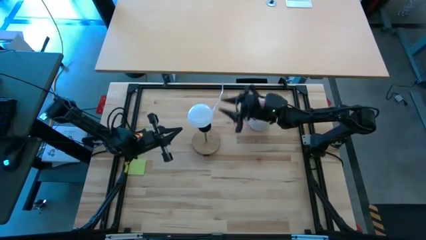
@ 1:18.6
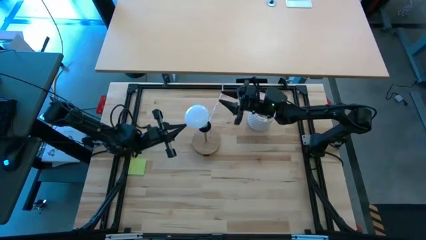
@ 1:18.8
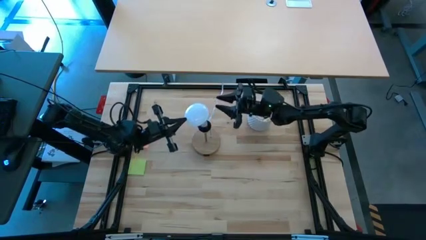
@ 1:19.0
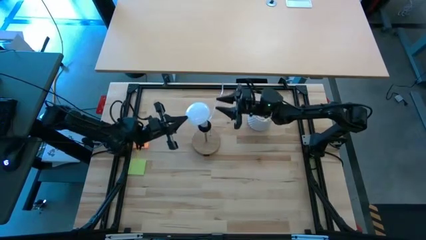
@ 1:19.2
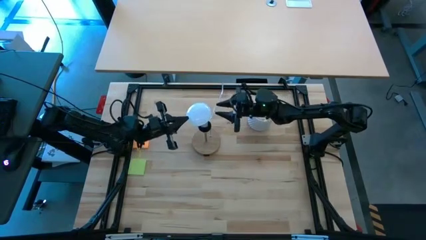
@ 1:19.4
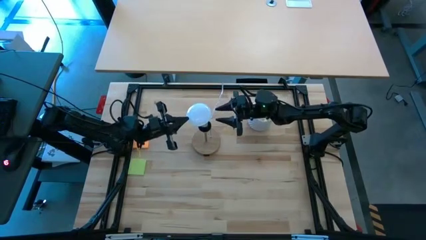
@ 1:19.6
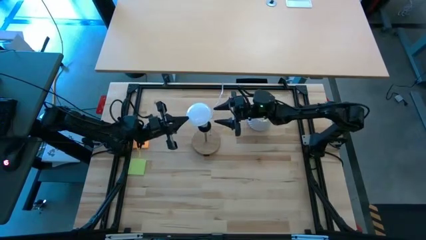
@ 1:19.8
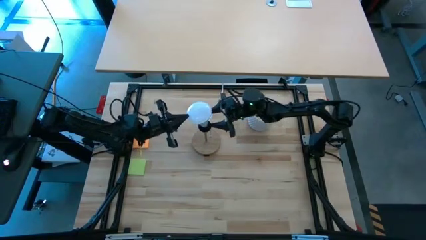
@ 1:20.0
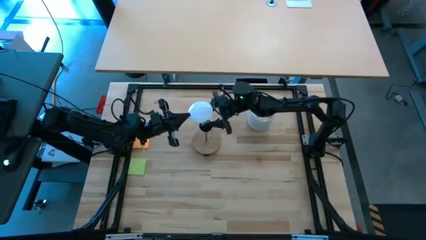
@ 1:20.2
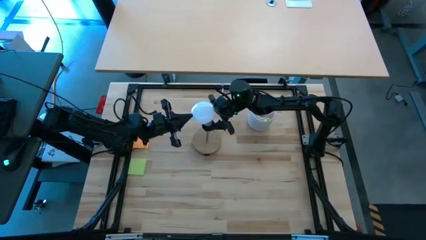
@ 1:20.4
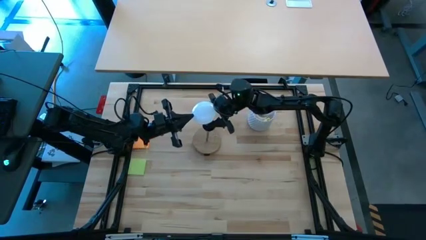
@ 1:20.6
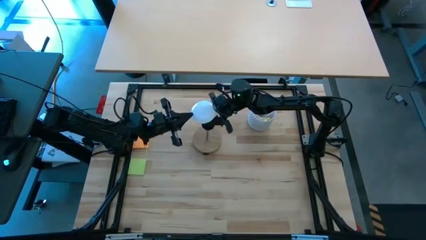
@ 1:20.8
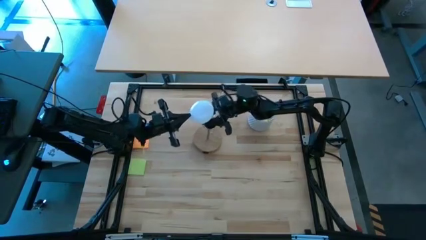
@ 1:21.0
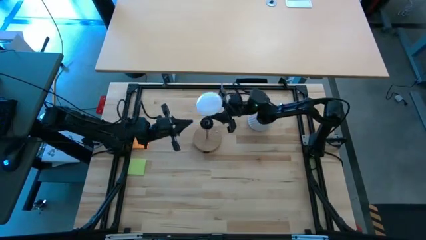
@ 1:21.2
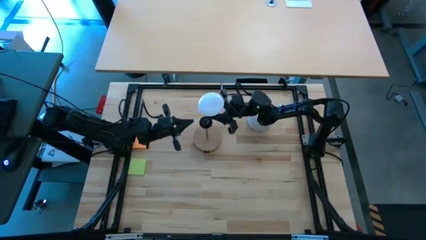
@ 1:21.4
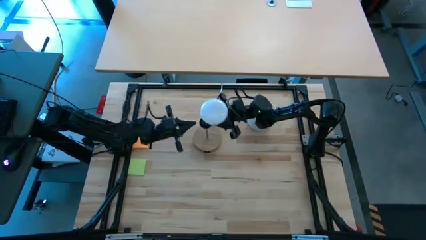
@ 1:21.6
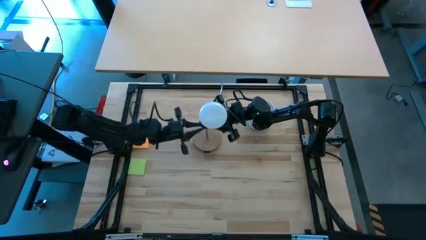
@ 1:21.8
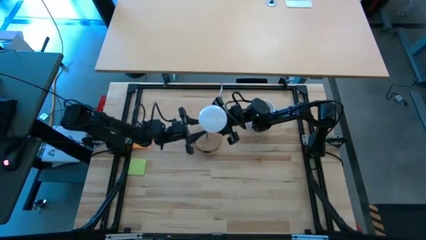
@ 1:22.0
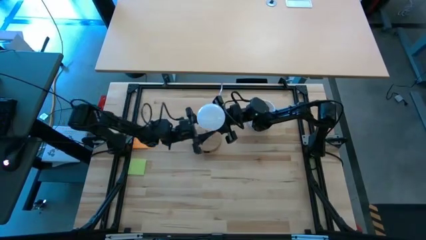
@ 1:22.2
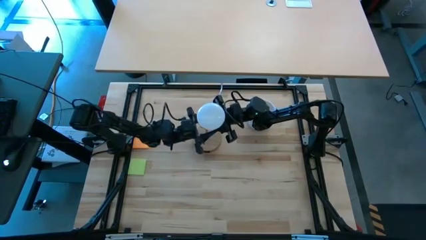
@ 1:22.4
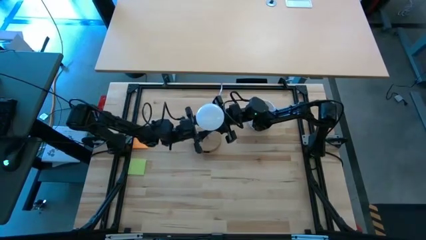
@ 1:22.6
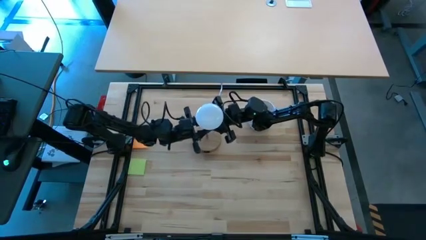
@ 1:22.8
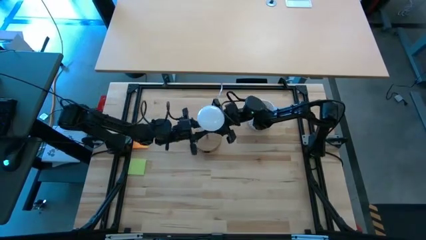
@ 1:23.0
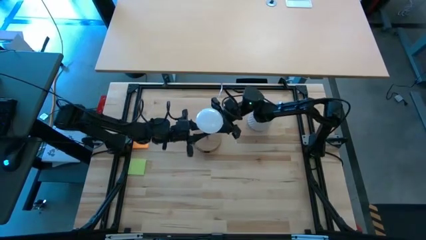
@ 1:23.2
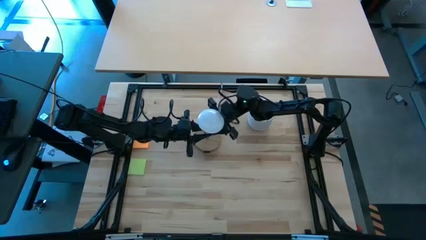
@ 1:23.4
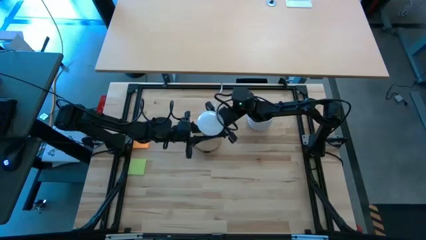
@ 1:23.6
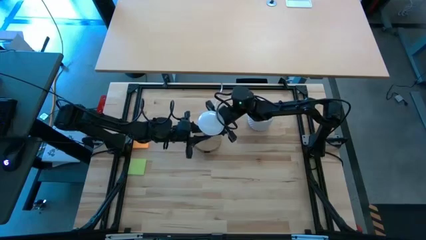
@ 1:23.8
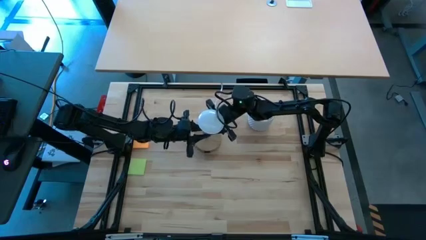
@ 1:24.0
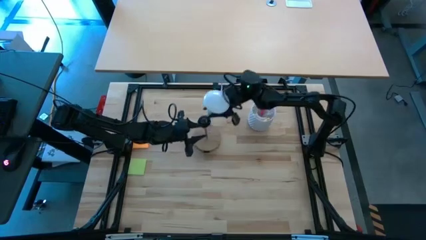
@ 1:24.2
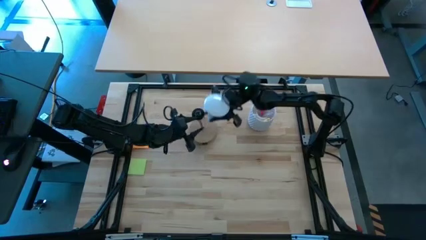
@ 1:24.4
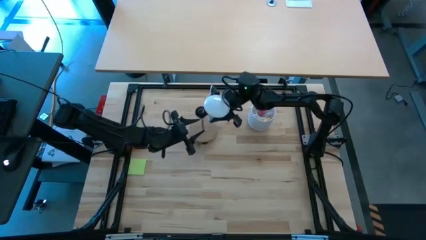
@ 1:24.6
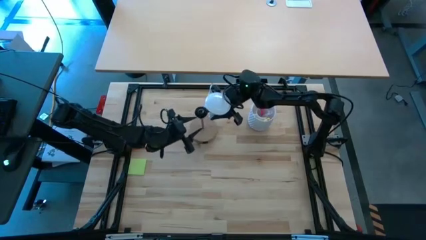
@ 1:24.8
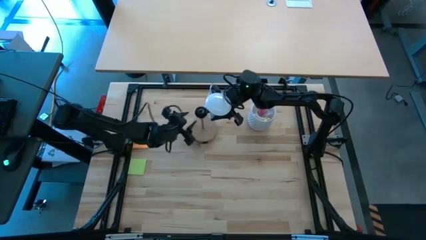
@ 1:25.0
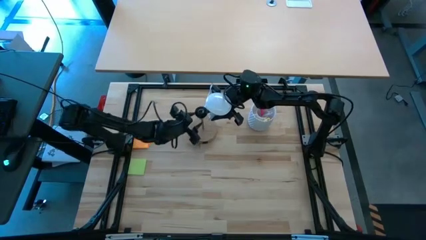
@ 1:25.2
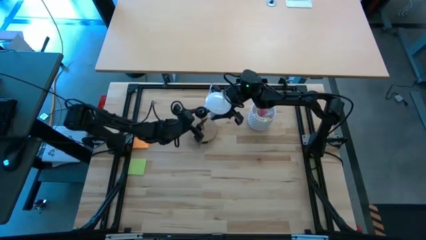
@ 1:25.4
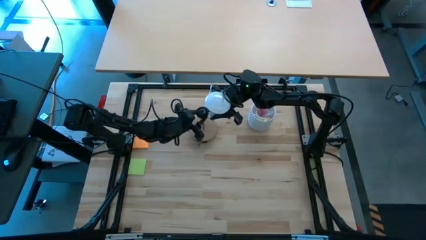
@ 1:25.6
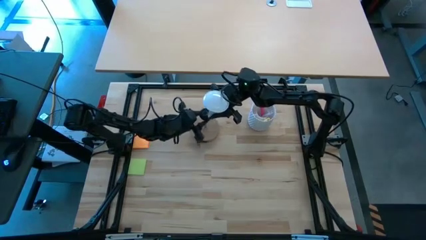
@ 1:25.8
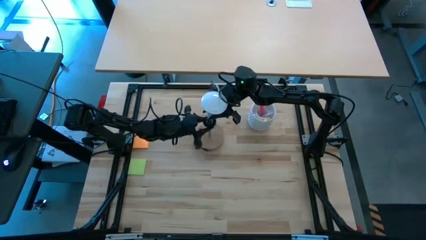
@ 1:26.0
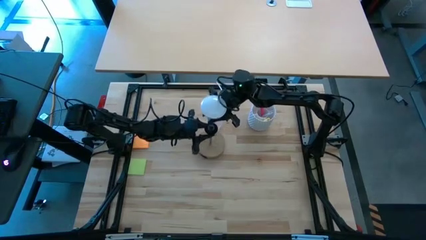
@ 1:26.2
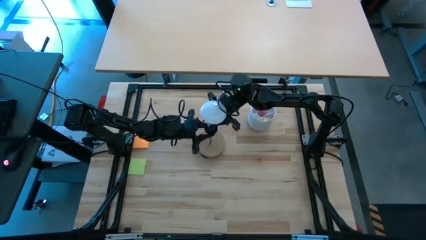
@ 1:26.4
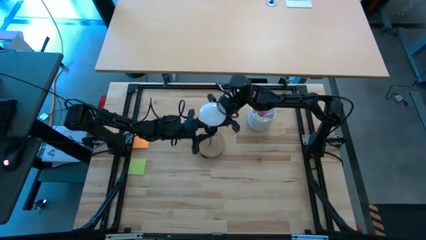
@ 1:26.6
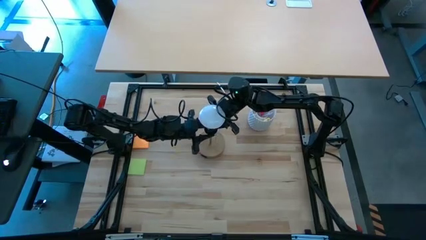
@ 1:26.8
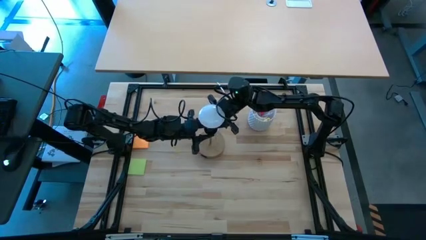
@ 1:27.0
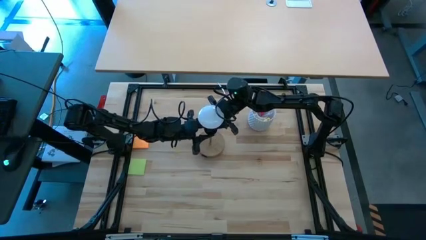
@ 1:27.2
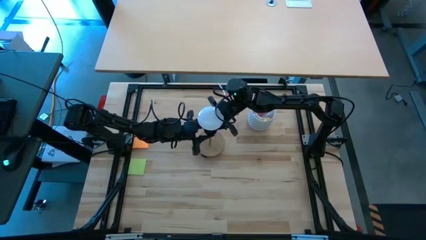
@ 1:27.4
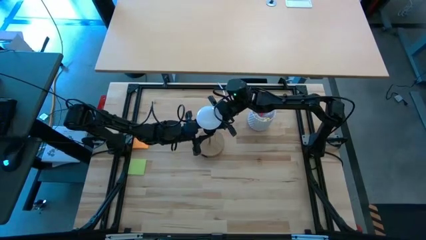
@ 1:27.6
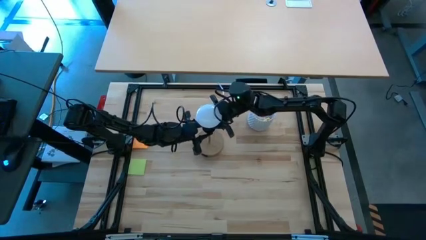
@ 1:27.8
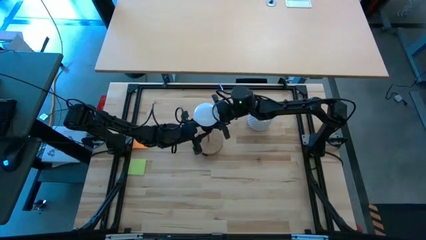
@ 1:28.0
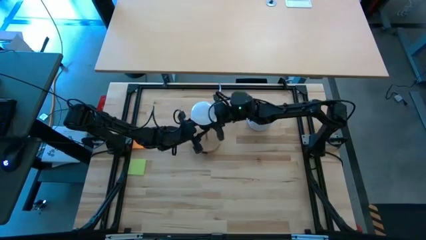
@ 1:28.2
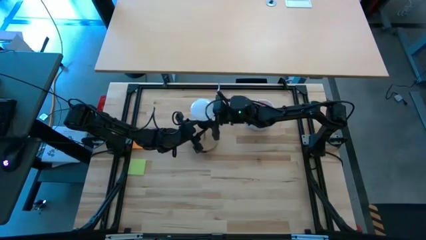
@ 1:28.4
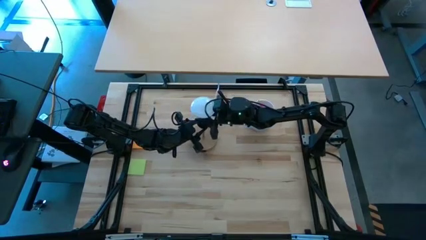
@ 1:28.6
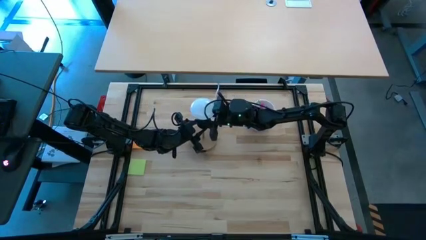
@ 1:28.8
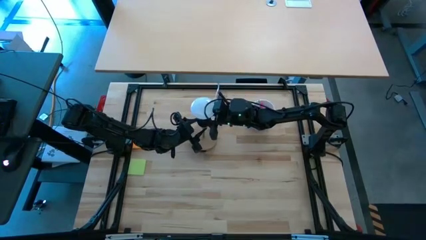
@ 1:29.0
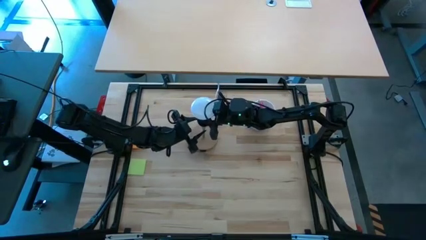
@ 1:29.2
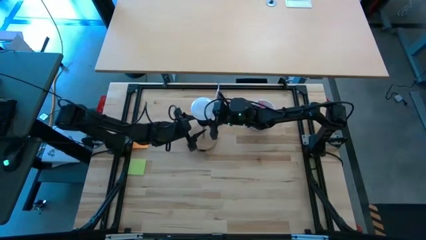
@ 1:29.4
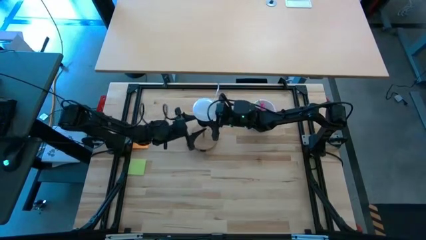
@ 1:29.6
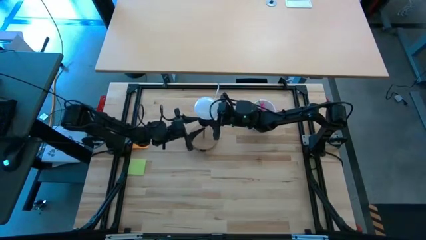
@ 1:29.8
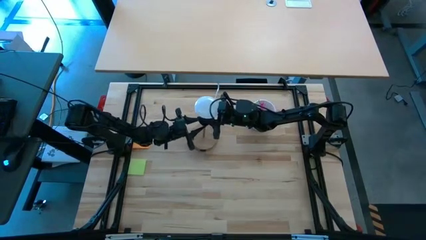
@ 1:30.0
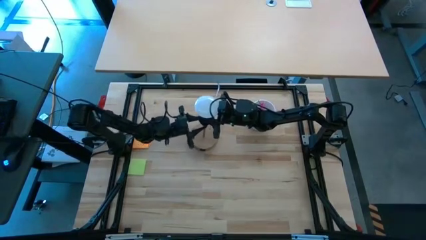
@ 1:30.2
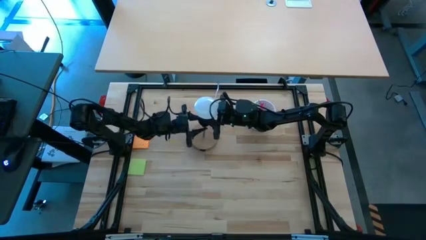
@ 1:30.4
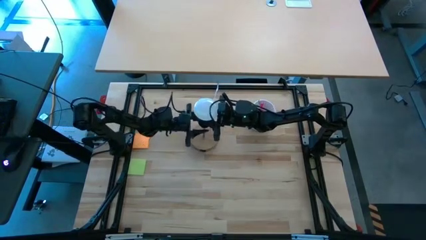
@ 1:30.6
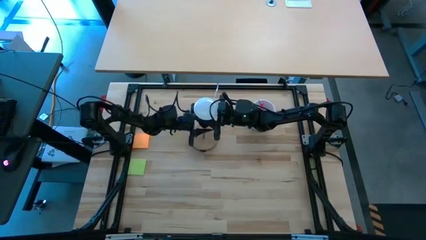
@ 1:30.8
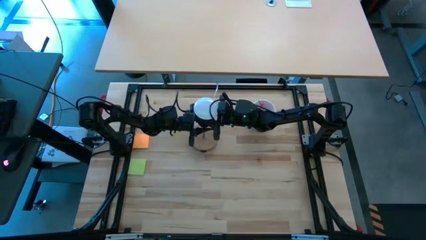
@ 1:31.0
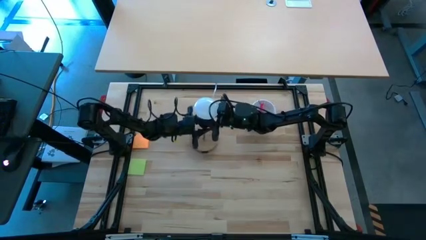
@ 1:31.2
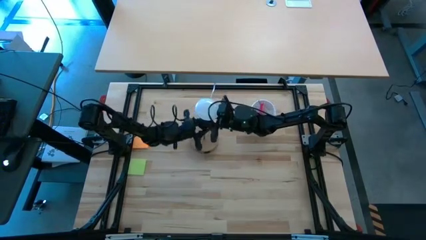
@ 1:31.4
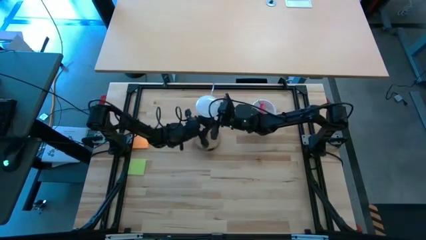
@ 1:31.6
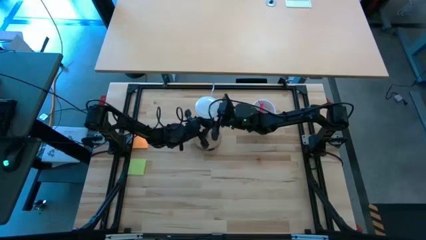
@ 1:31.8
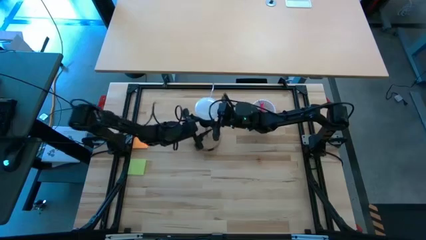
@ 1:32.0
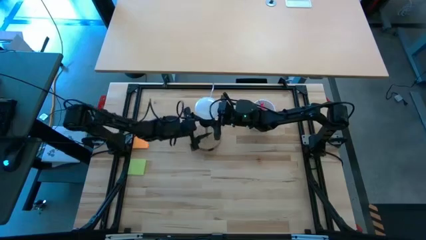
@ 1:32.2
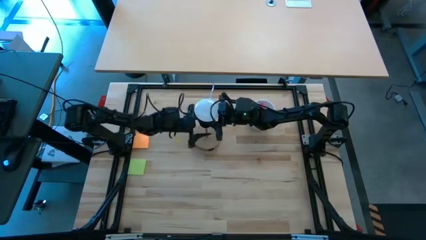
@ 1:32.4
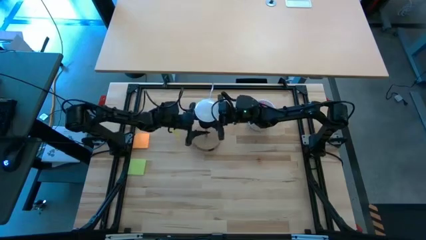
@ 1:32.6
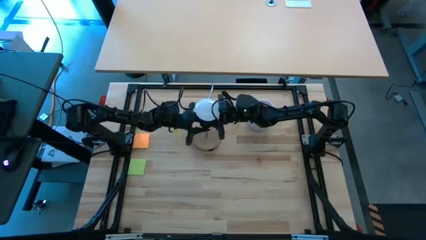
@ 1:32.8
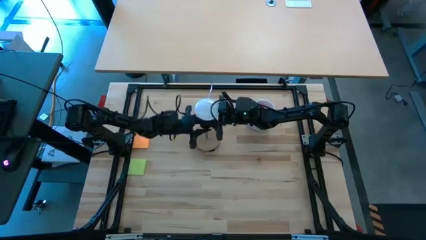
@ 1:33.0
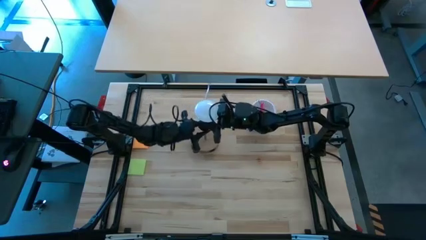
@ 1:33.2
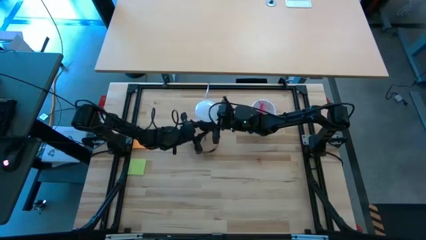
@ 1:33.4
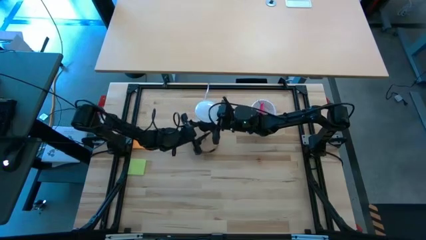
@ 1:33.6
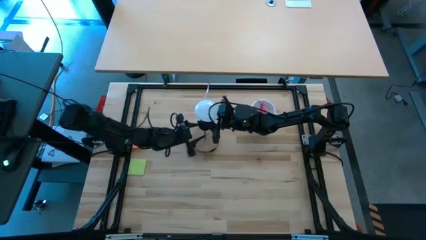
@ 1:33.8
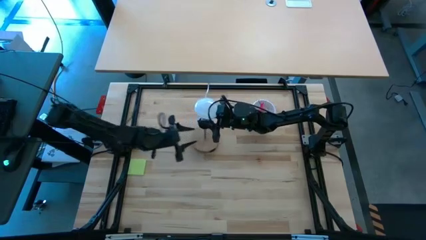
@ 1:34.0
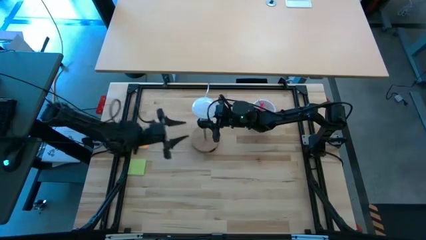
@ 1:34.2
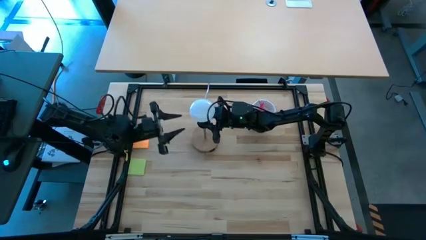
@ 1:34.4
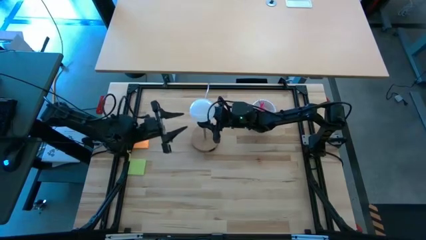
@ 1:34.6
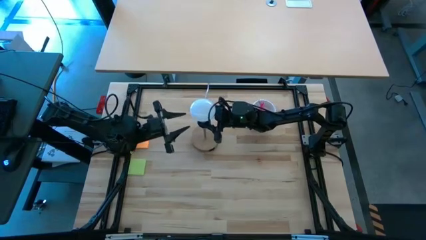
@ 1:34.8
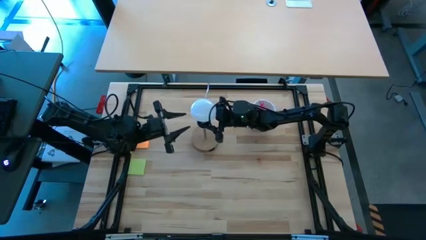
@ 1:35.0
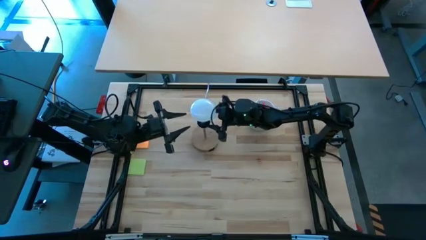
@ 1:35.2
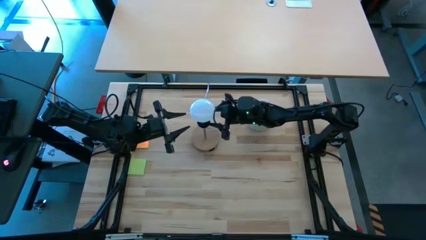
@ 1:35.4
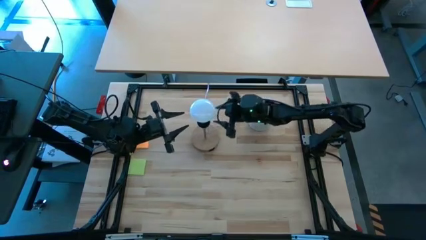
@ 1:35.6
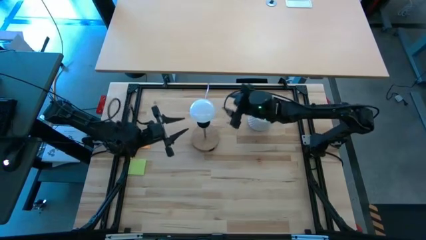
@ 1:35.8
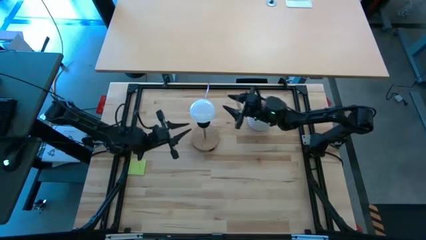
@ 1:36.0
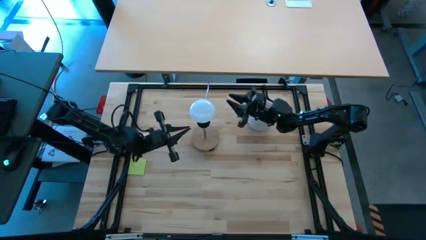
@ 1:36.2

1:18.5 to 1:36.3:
Task: Screw lightbulb
Insert the light bulb into the brown lamp
